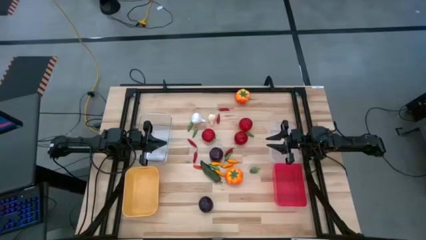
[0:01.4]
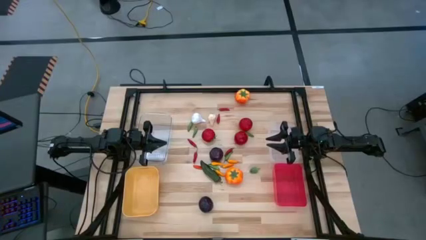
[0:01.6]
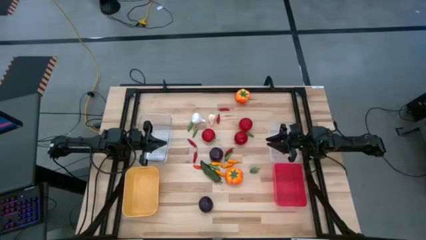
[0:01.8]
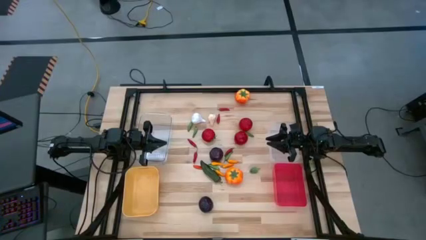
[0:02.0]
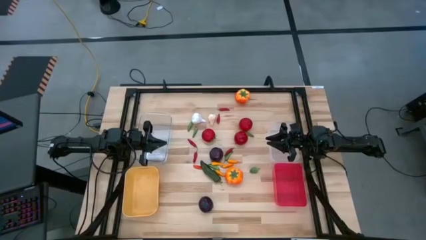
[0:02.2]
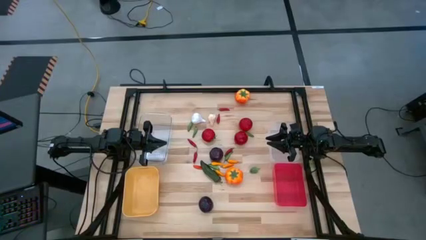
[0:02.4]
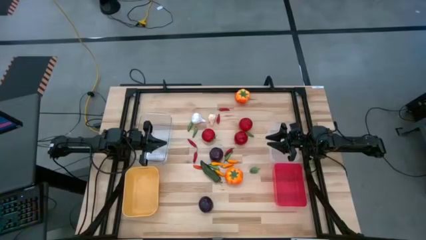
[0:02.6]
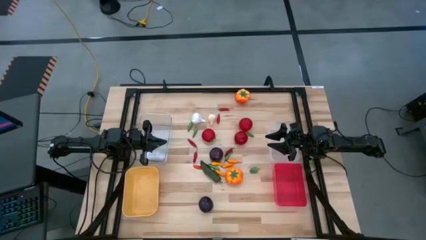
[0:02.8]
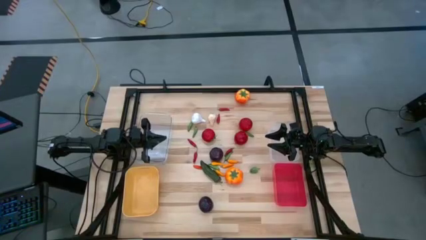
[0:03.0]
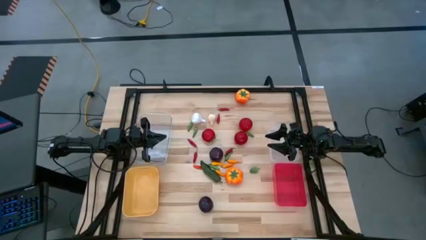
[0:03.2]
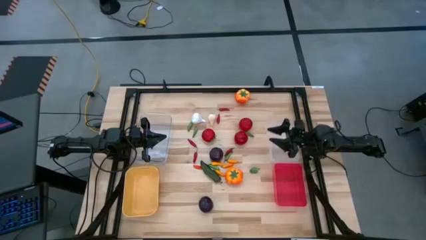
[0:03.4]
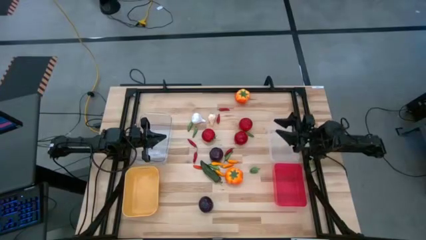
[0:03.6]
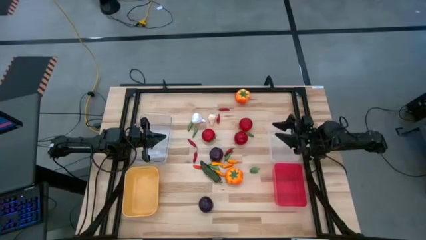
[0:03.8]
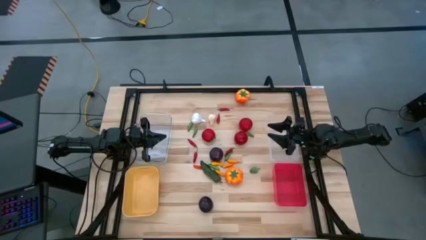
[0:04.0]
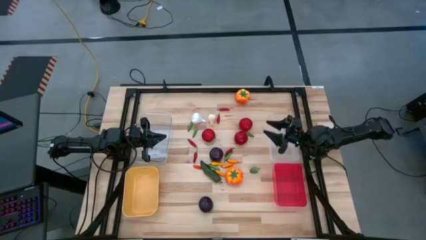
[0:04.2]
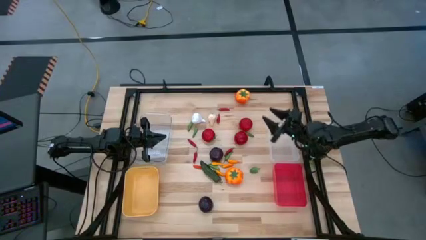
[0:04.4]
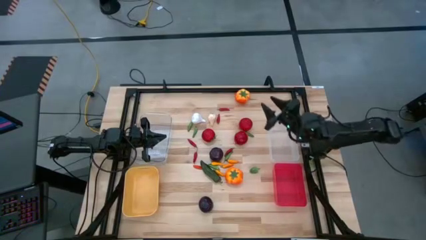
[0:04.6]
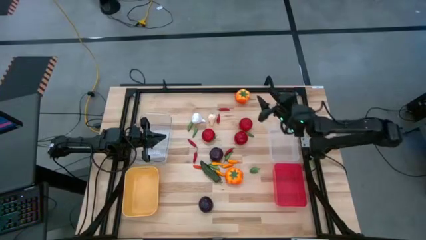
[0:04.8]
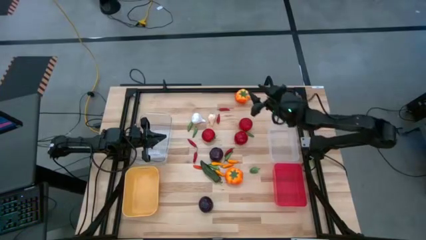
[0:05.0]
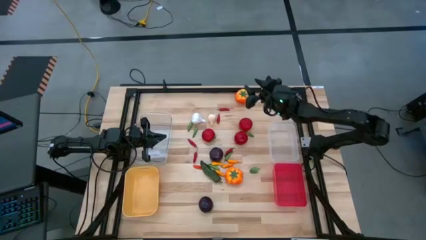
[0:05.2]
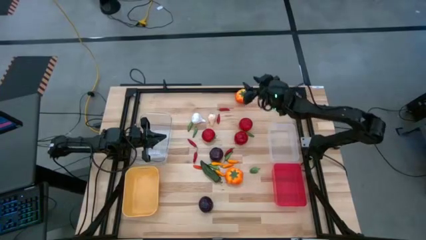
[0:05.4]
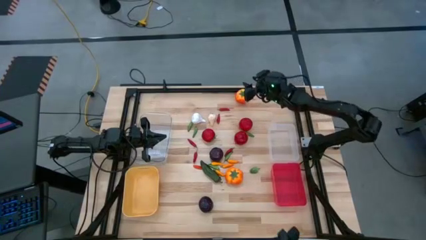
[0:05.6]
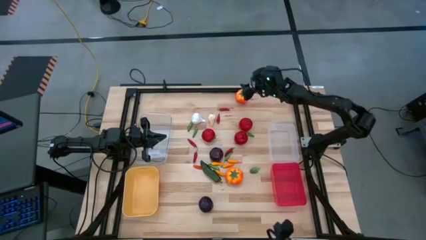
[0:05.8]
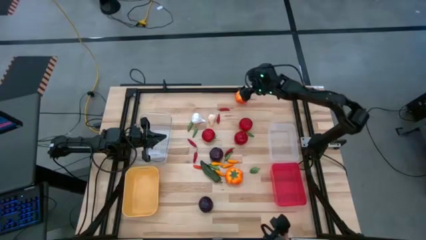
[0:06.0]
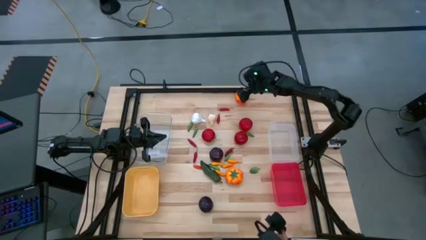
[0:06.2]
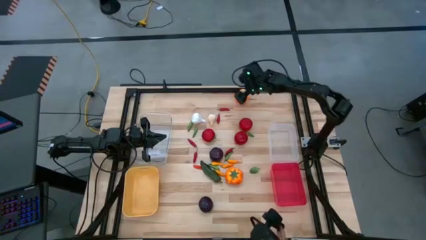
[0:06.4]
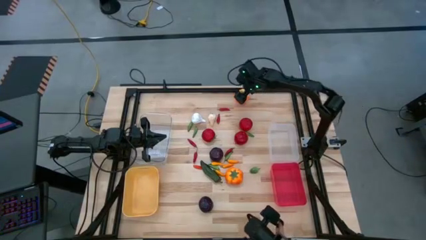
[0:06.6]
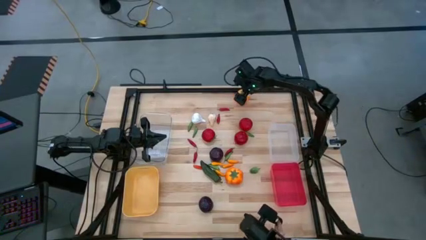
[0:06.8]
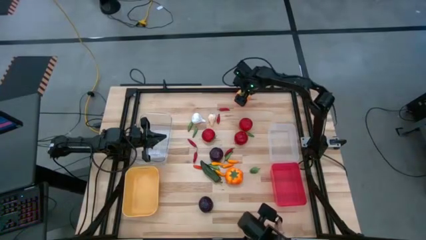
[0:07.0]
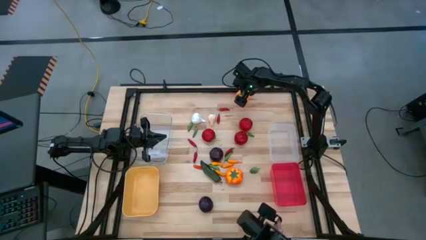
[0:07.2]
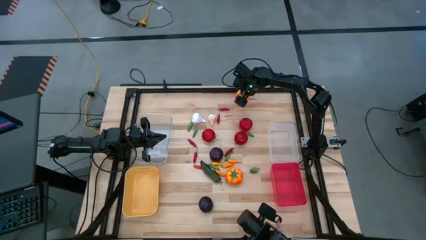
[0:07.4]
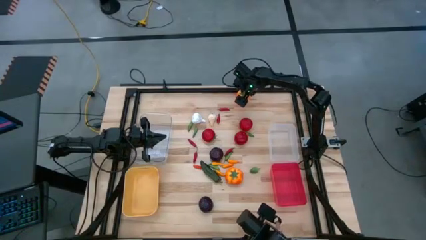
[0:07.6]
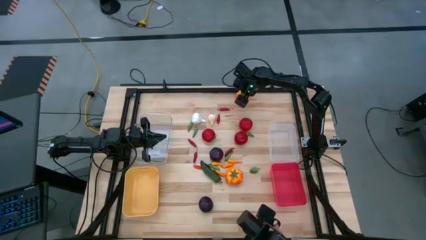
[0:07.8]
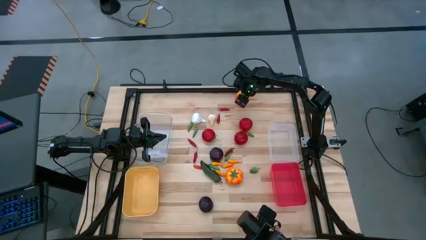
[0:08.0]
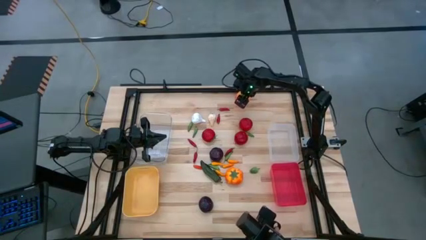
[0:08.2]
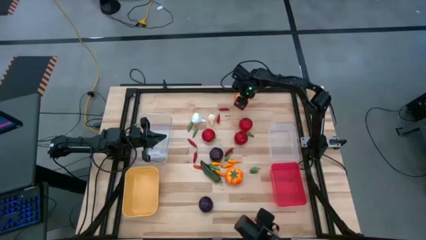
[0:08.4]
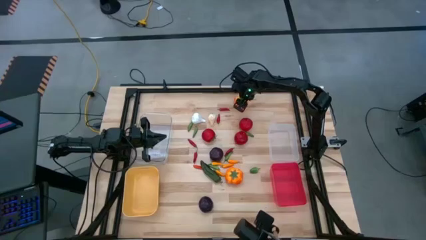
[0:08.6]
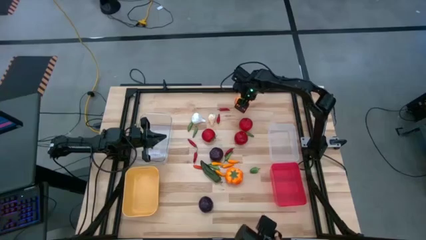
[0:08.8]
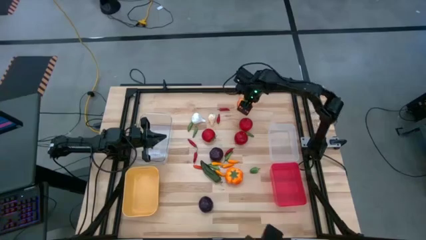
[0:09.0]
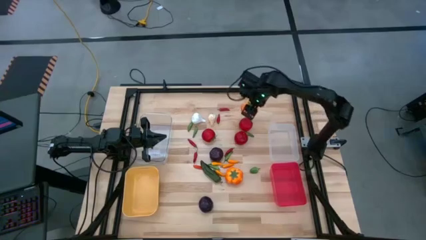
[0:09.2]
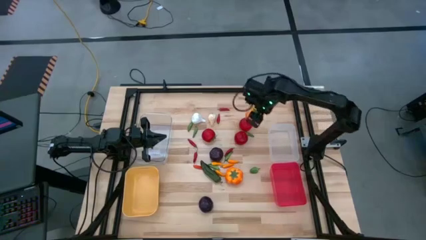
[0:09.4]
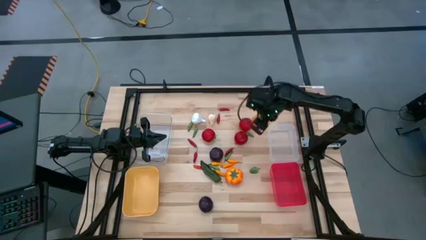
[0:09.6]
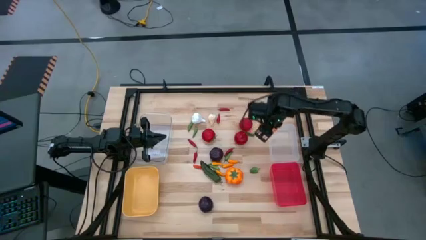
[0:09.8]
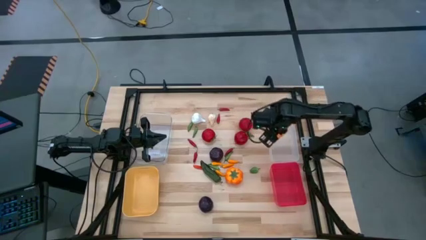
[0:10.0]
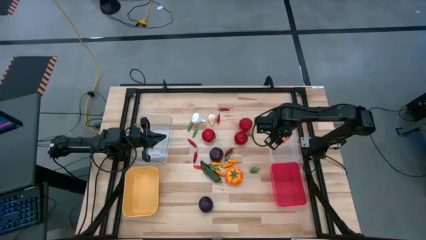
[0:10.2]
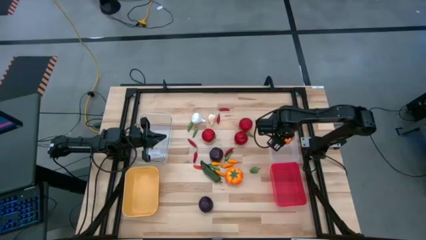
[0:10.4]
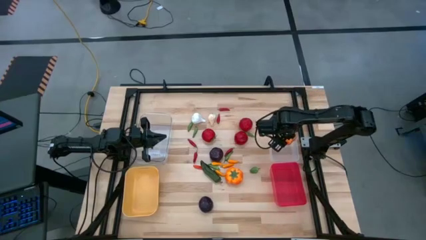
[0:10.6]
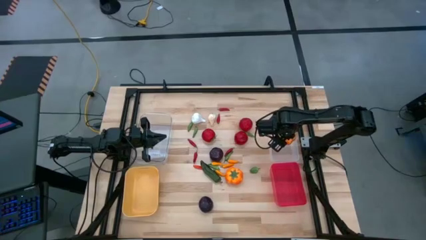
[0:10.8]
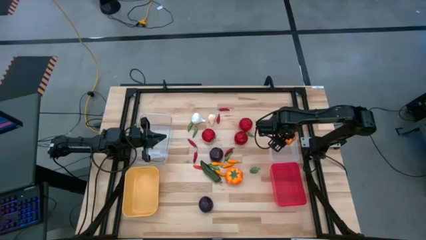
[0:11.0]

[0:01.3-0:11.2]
Task: Sort produce into baskets
Put the orange tomato into the right transparent bin

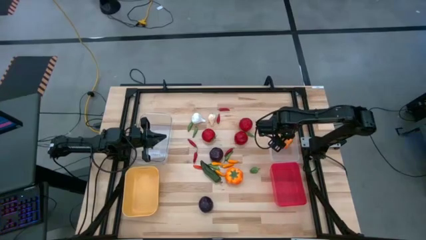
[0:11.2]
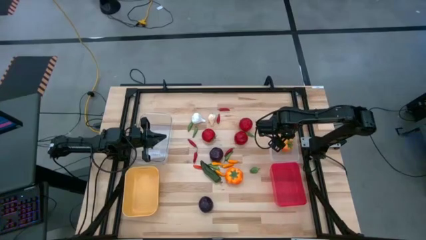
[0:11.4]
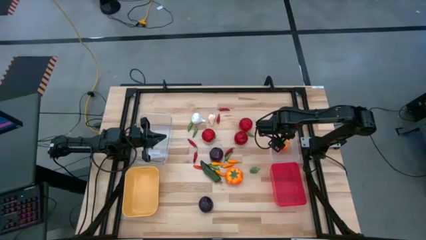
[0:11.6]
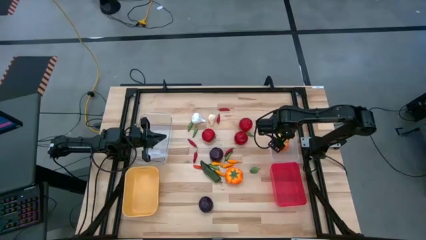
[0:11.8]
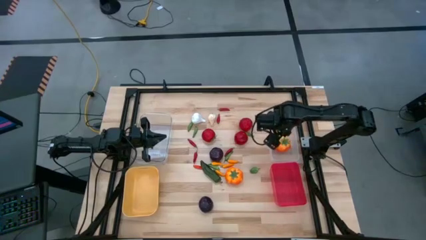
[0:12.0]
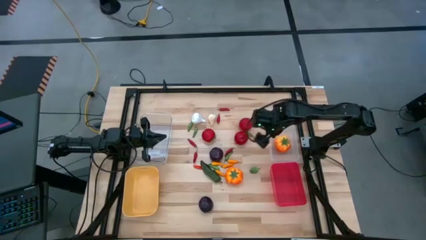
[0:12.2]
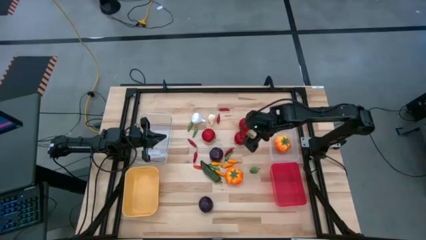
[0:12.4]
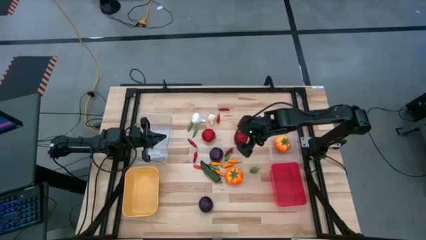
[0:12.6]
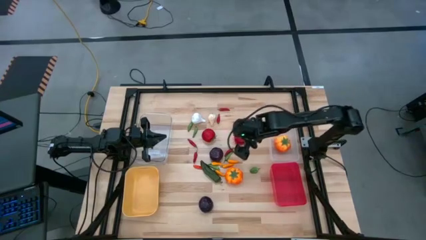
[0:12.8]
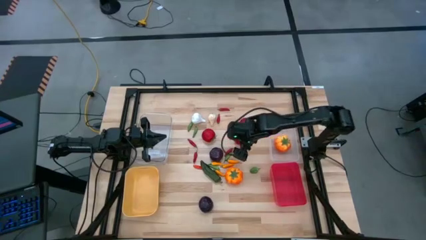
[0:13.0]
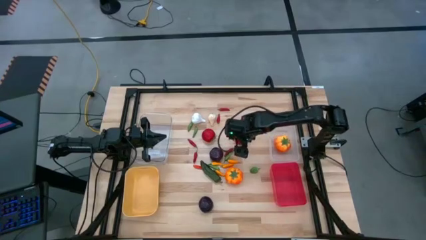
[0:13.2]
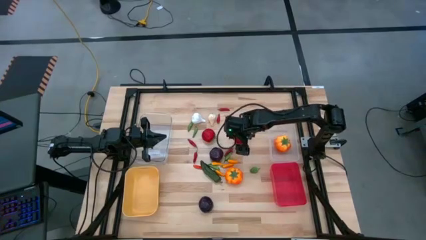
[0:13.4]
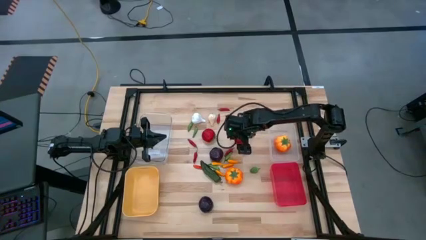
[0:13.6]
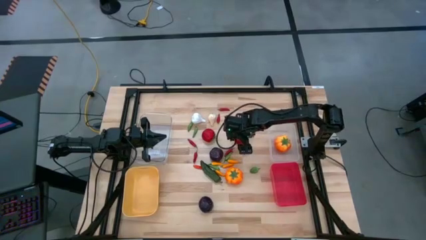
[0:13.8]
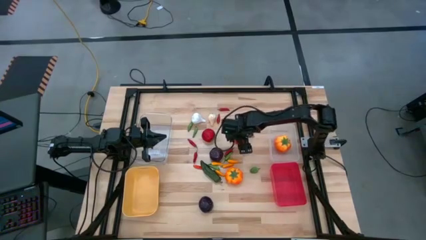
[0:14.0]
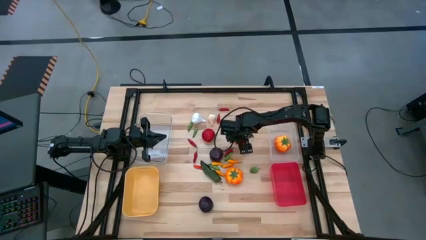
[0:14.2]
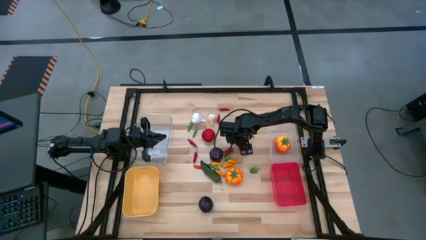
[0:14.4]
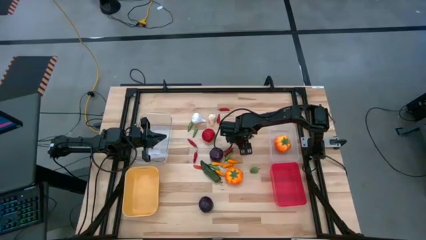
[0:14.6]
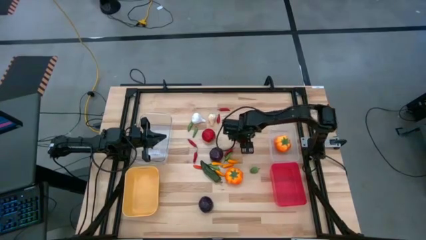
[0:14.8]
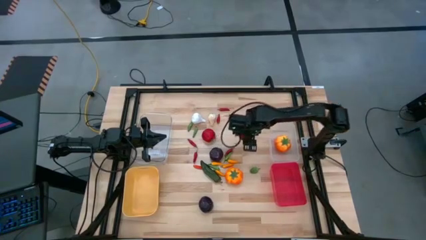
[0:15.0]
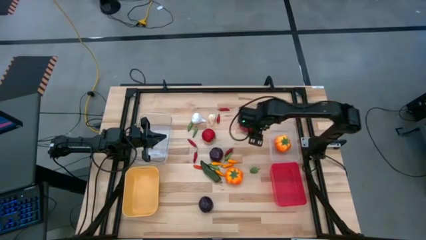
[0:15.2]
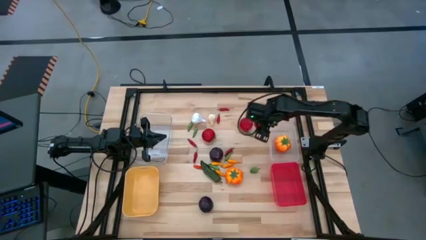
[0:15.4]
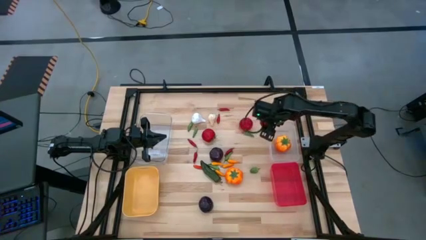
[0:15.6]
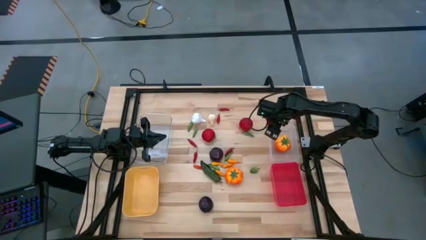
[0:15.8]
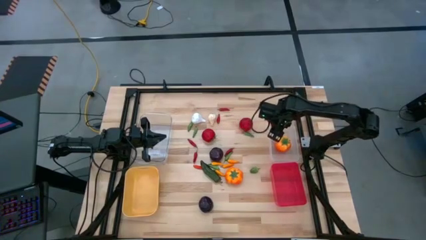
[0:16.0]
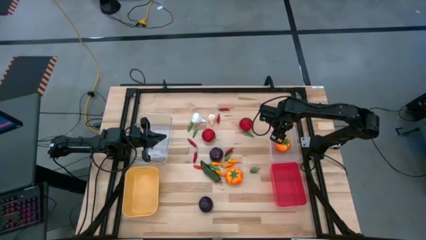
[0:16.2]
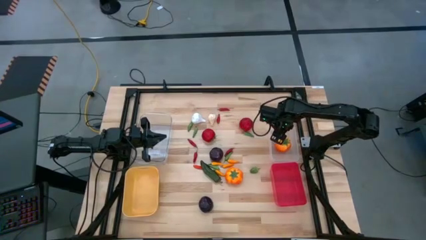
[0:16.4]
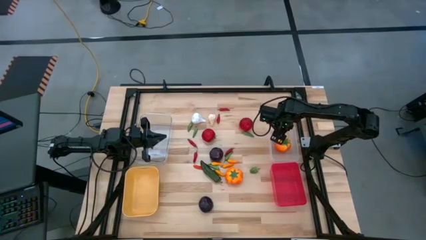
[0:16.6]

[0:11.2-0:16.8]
Put the red tomato into the right transparent bin

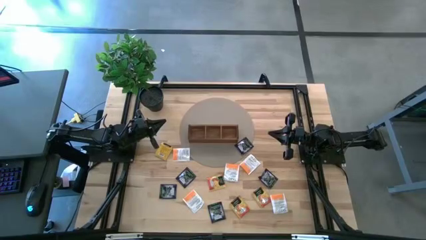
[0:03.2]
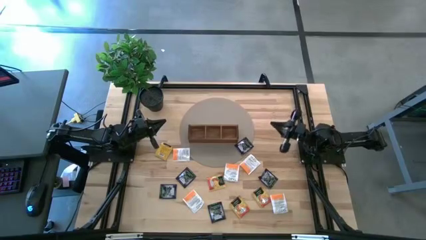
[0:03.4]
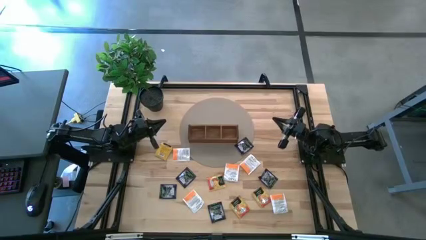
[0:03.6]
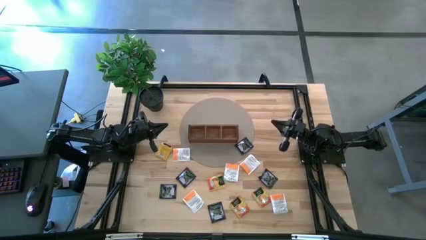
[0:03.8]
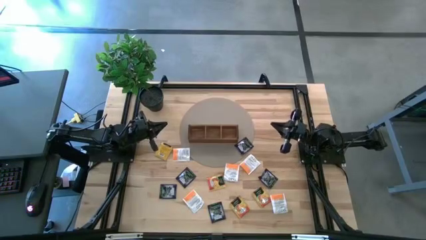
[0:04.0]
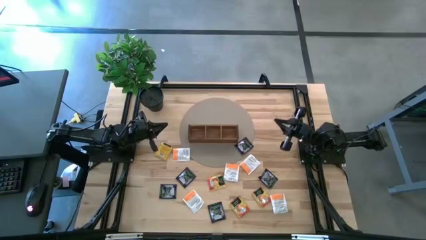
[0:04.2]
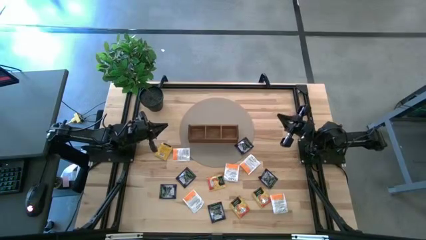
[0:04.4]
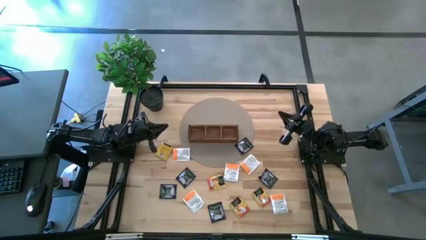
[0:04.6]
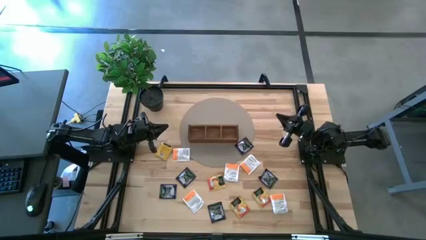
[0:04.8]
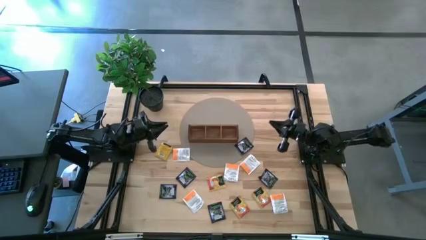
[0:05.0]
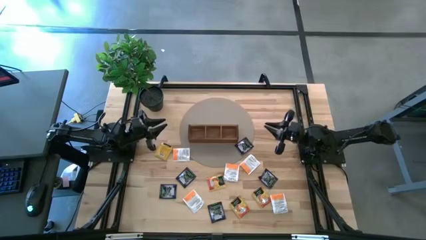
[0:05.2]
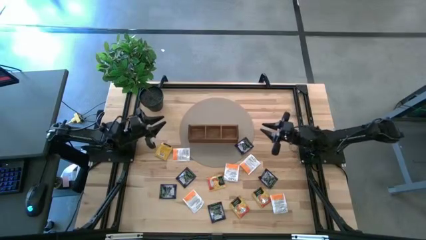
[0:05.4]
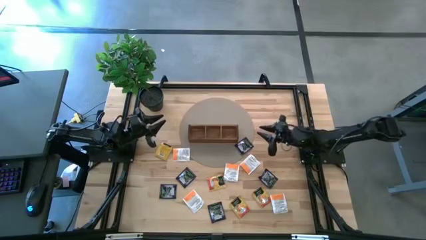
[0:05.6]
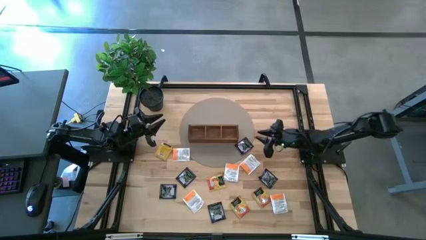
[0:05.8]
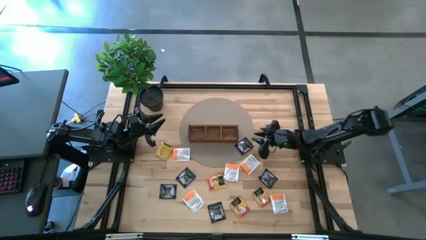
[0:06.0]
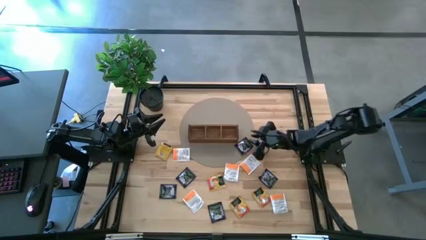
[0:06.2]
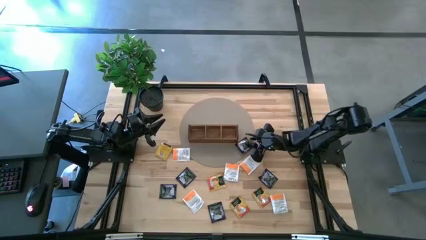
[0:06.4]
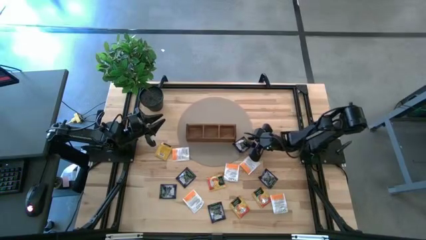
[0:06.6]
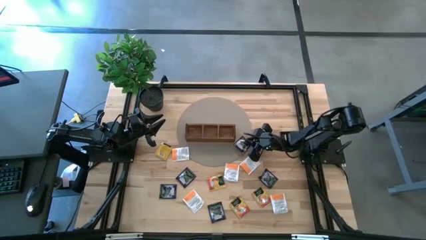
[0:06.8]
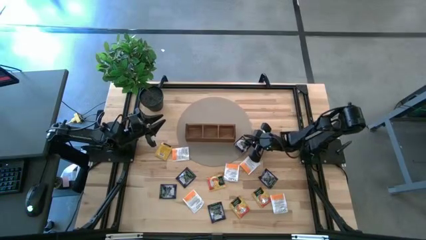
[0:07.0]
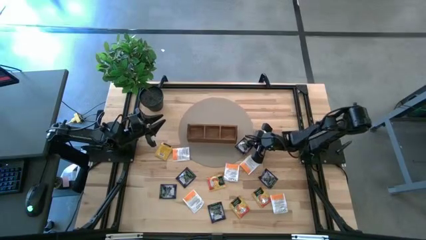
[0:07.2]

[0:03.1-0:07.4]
Task: Pick & Place Tea
Put the purple tea bag into the right section of the wooden organizer
